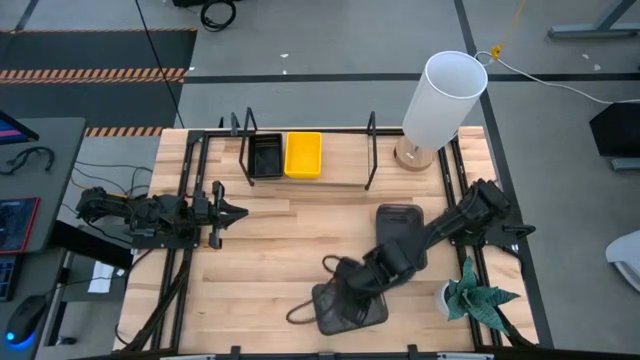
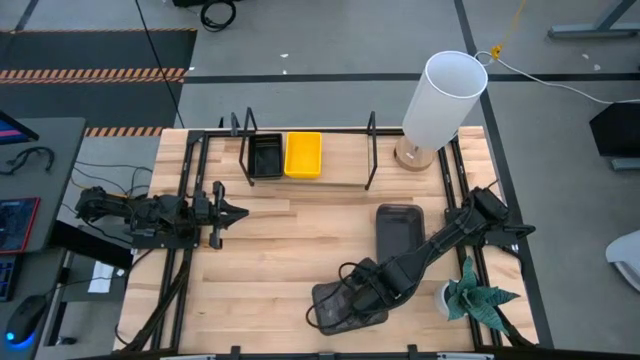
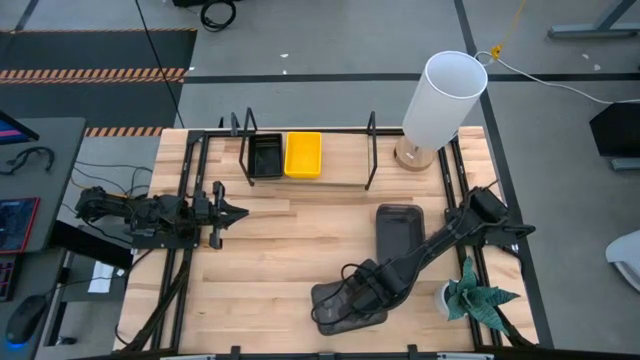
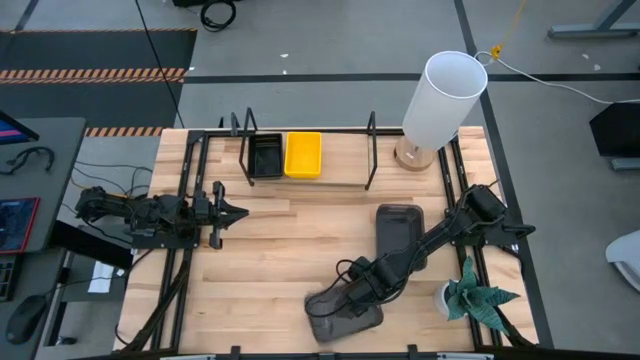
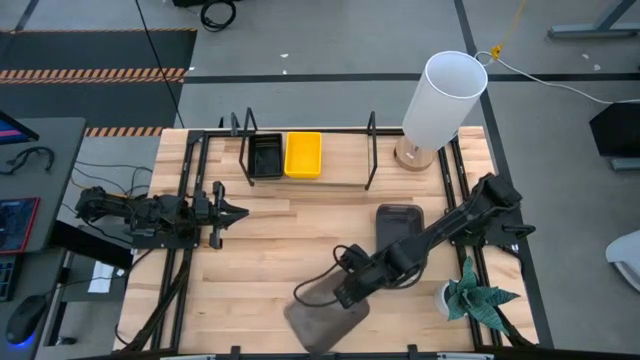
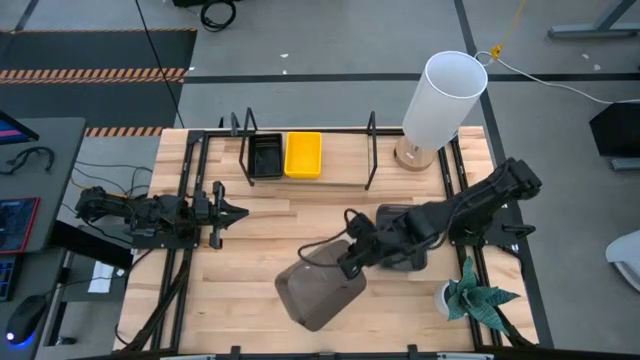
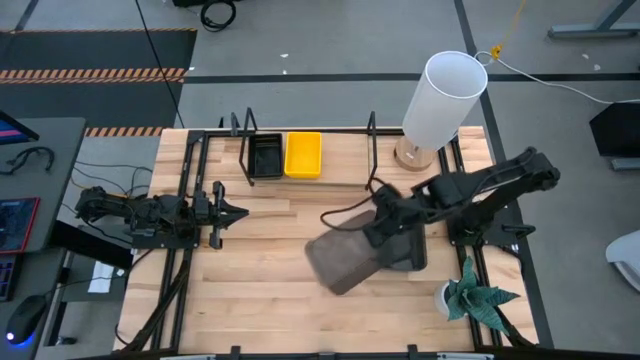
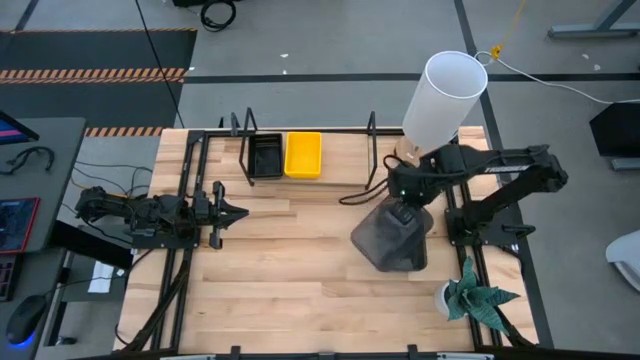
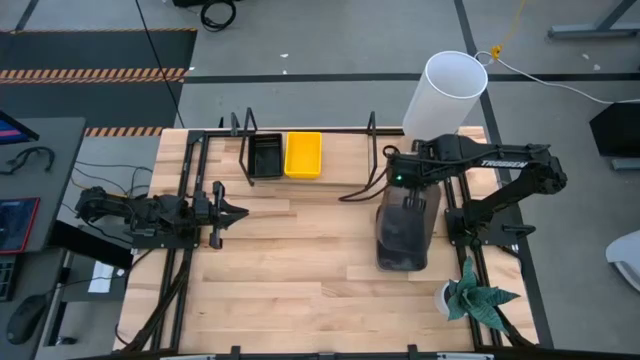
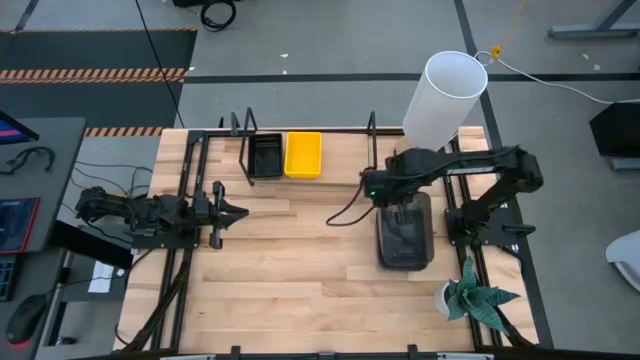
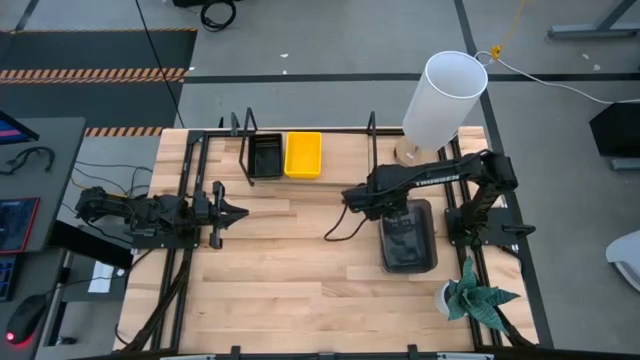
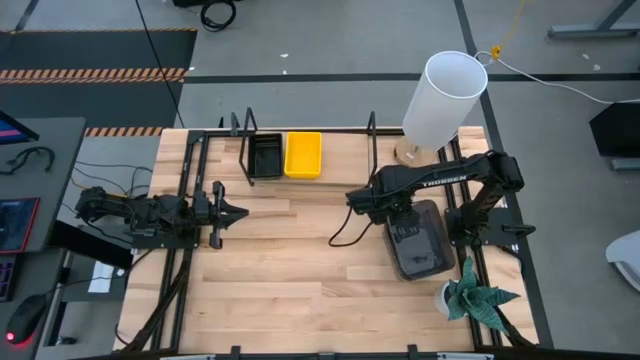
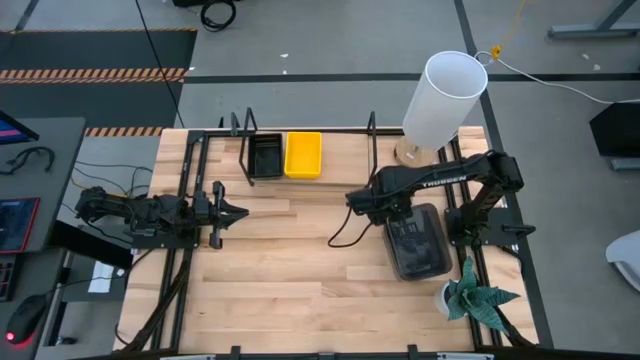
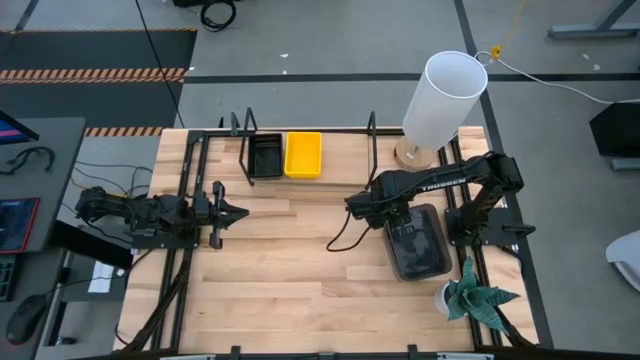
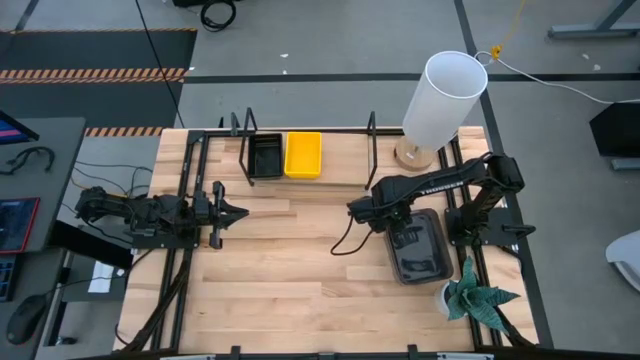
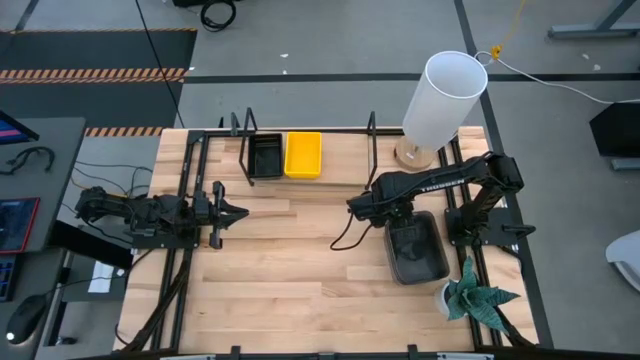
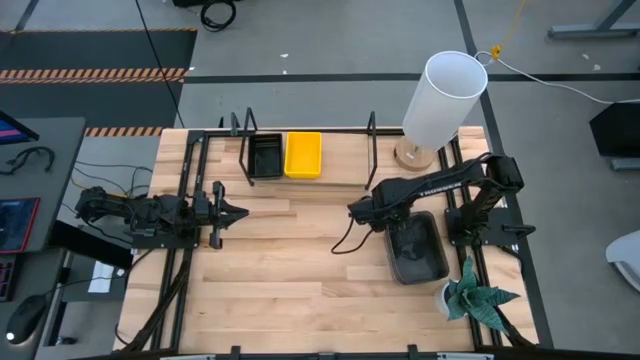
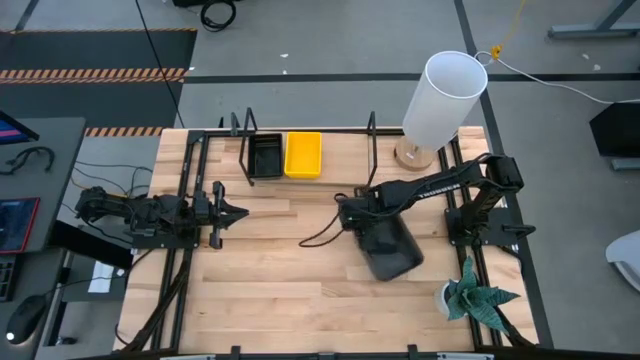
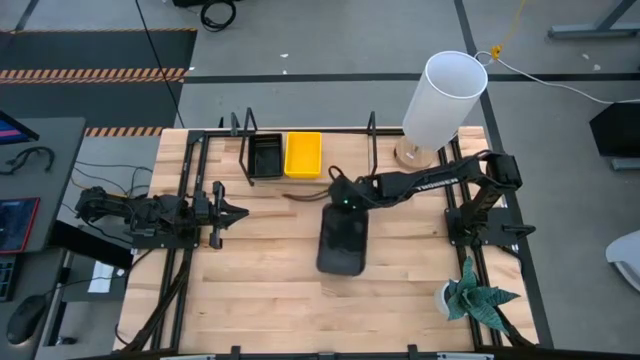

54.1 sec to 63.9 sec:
Task: Stack baskets on shelf by color
Stack the left gray transparent bin on top of the other gray transparent bins

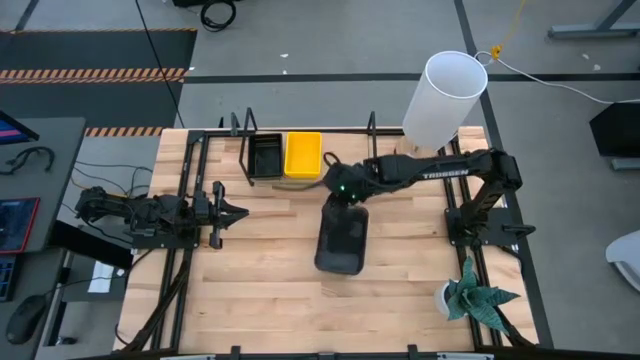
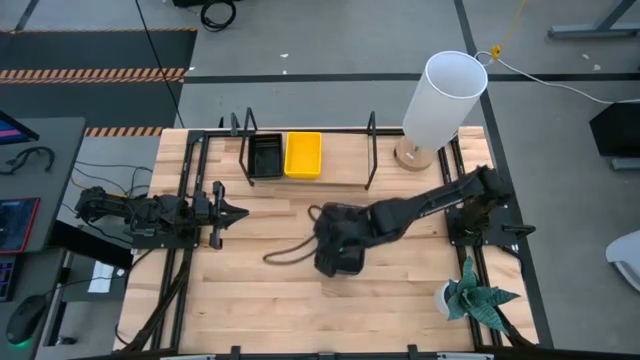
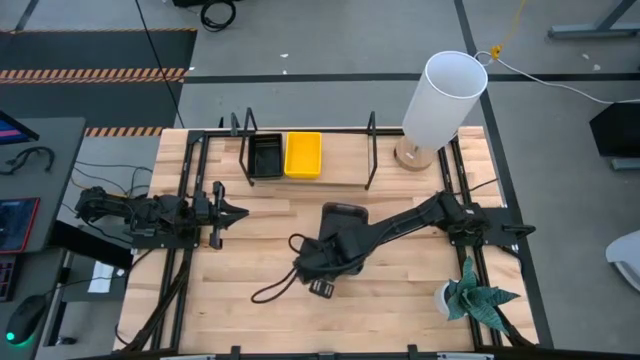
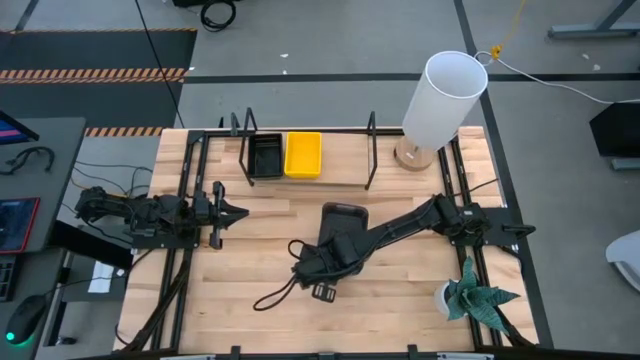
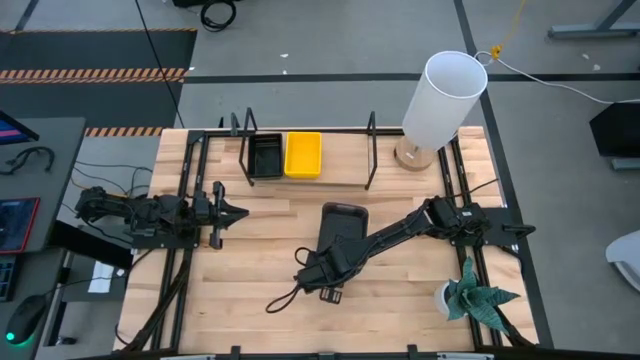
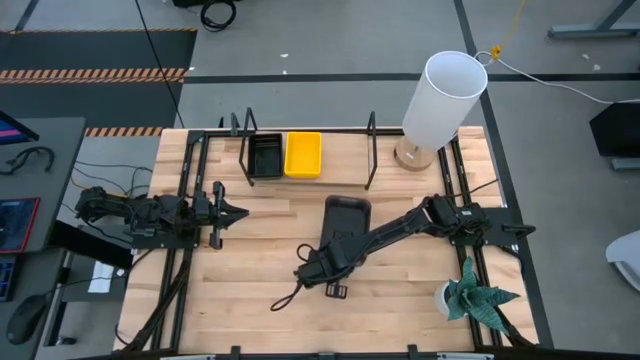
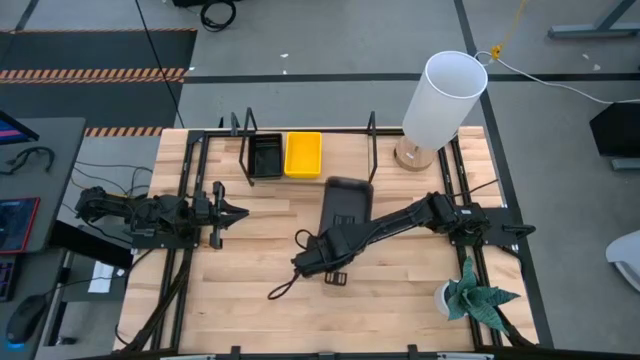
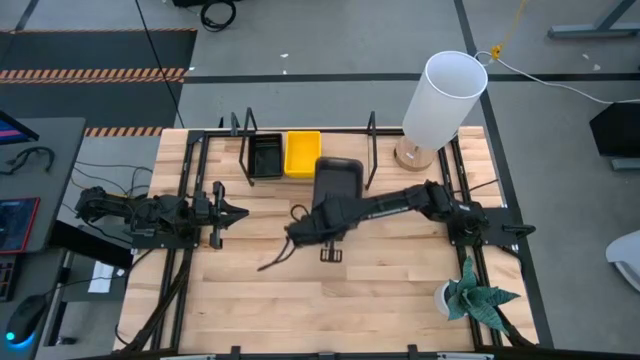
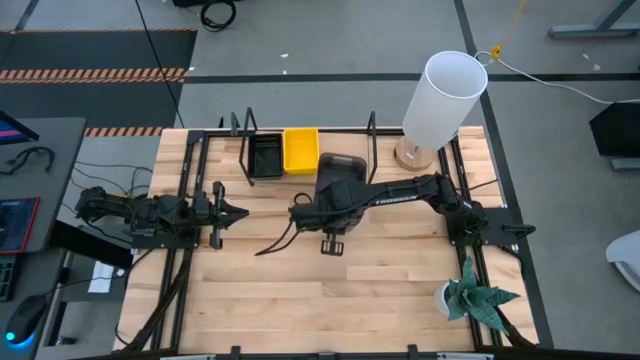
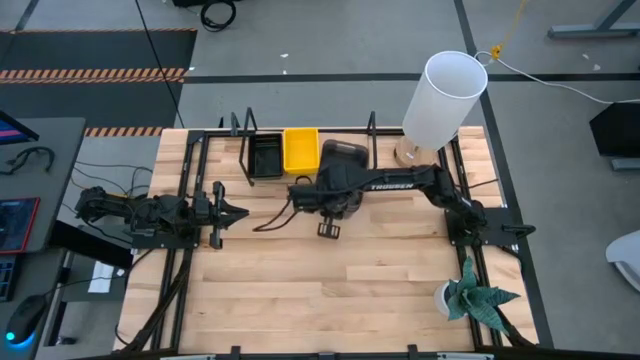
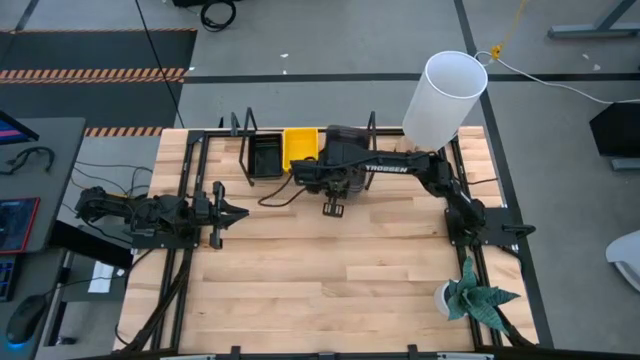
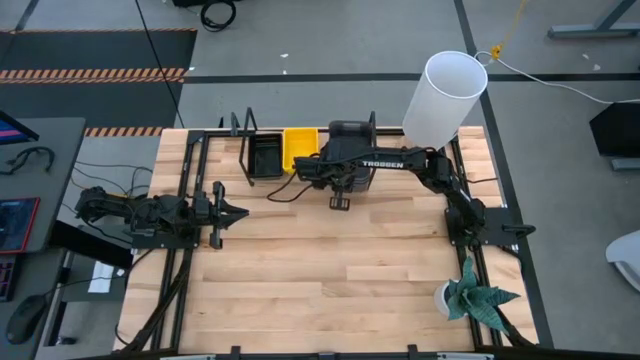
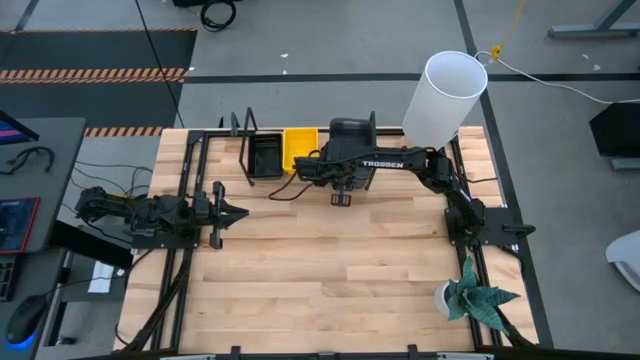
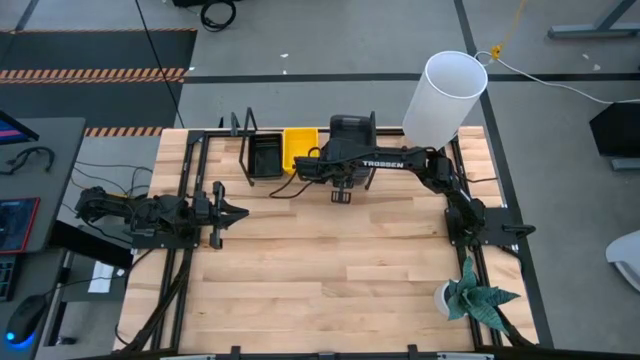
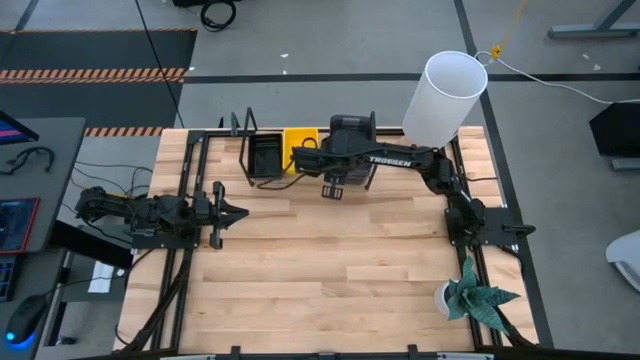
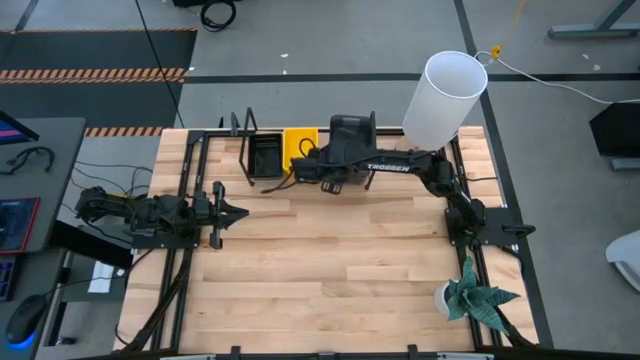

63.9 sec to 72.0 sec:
Put the stacked gray transparent bin on the shelf

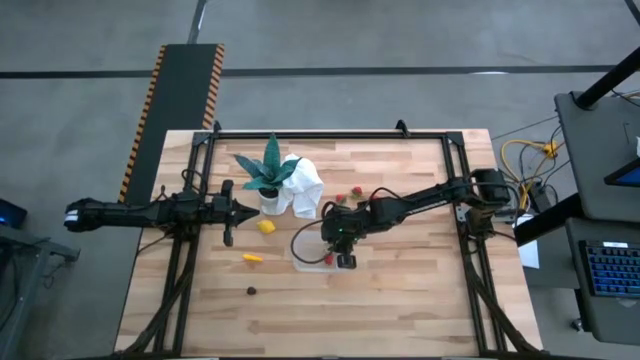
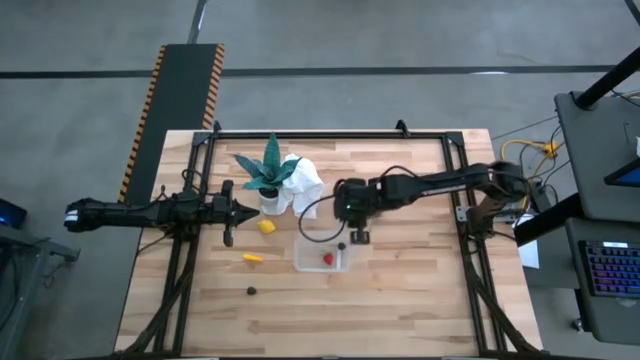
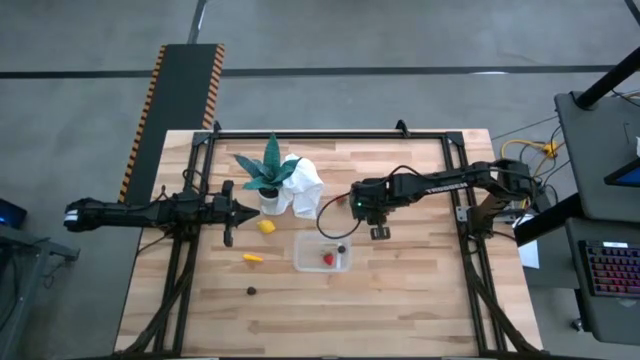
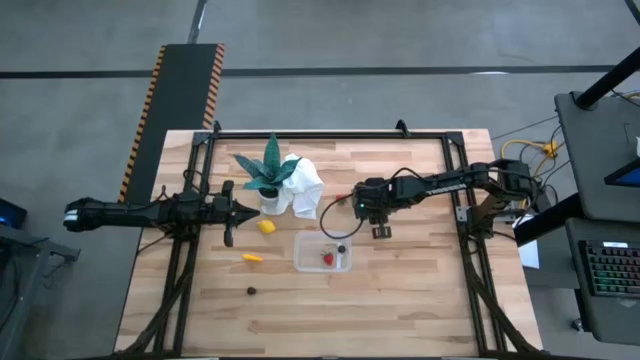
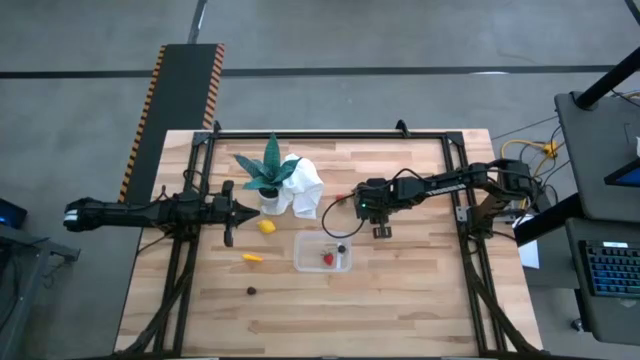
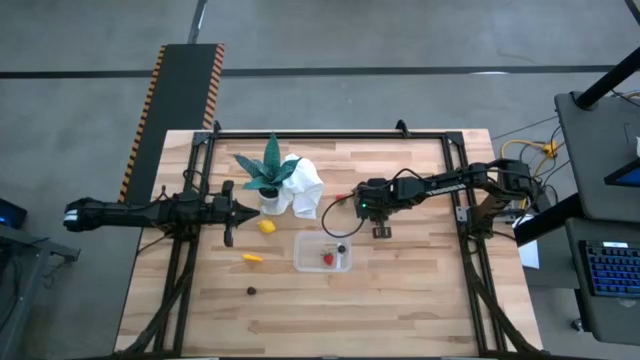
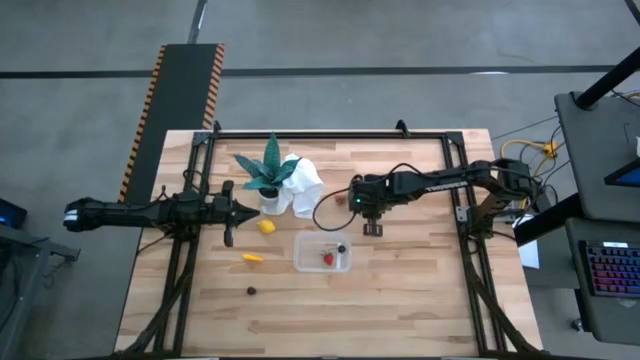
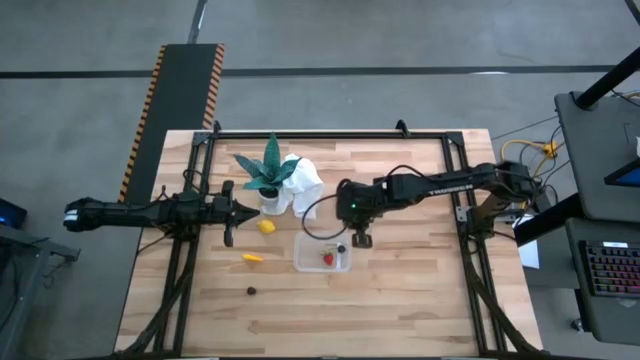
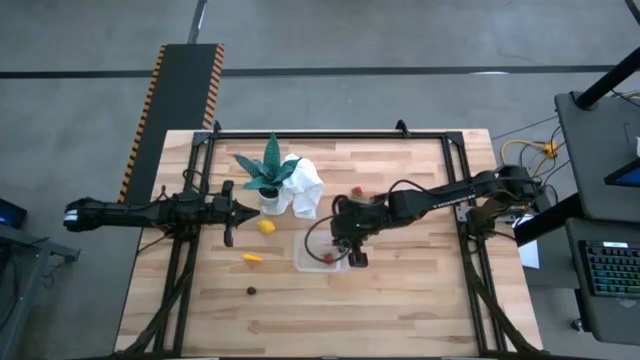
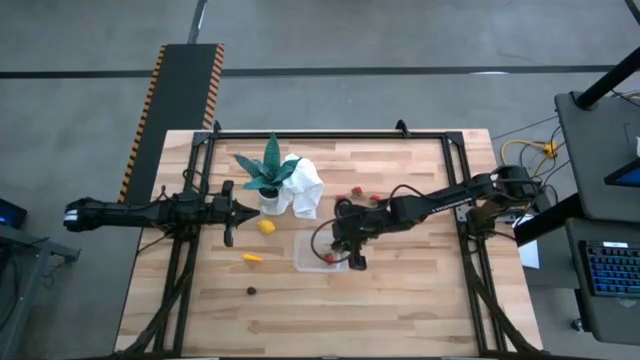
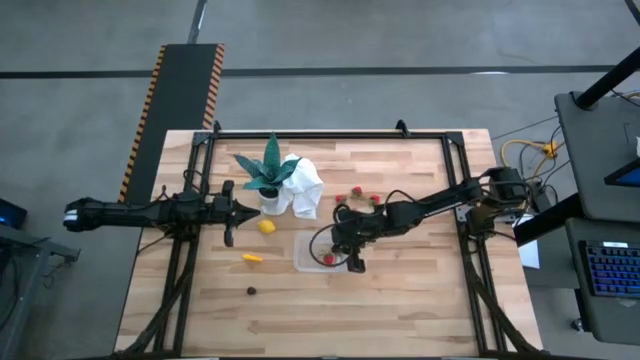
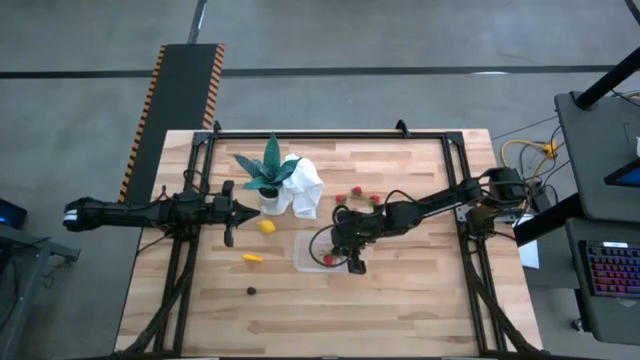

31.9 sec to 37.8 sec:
Task: Pick and placing Produce into tupperware
Put the strawberry into the bin
